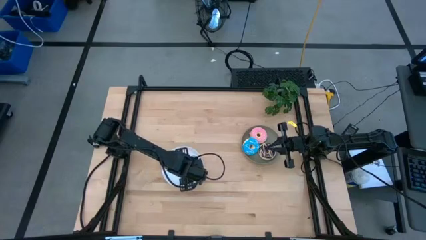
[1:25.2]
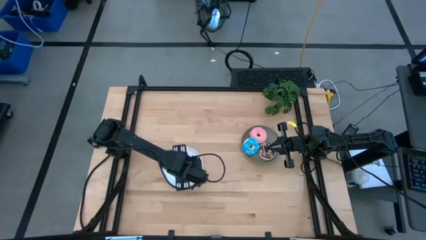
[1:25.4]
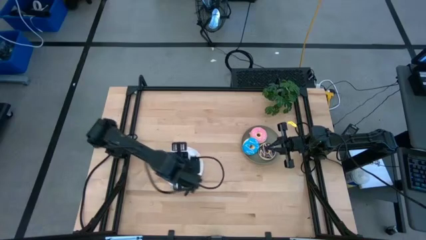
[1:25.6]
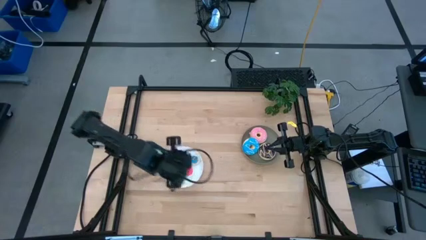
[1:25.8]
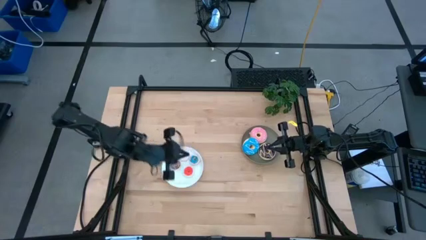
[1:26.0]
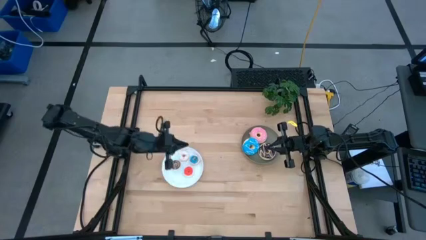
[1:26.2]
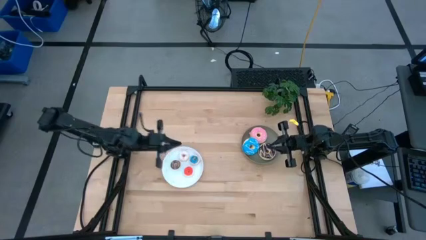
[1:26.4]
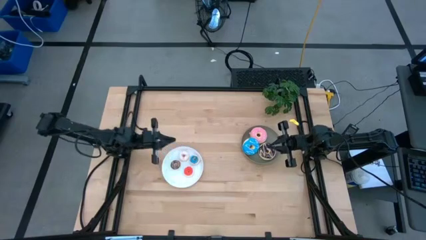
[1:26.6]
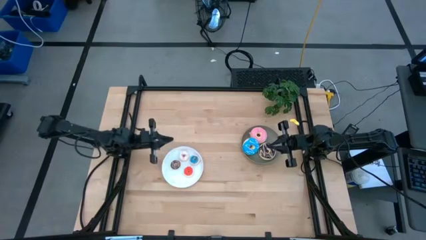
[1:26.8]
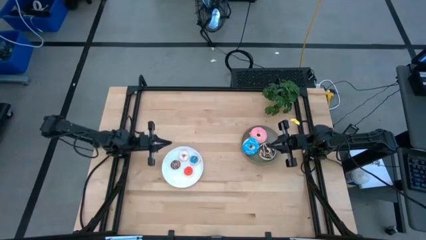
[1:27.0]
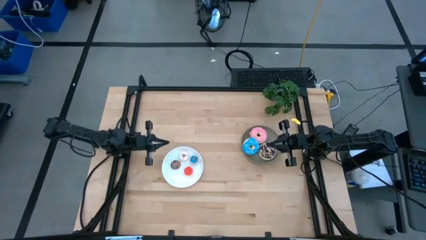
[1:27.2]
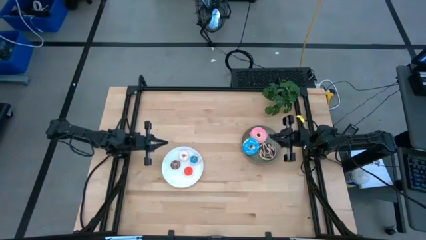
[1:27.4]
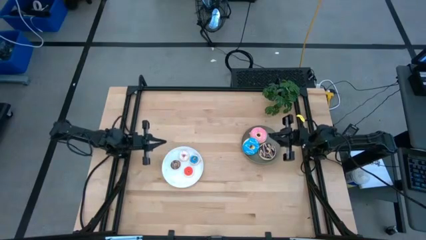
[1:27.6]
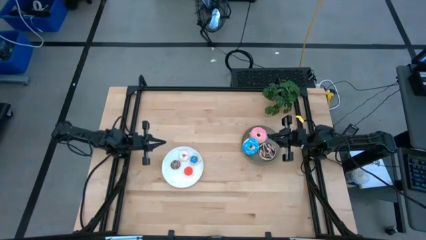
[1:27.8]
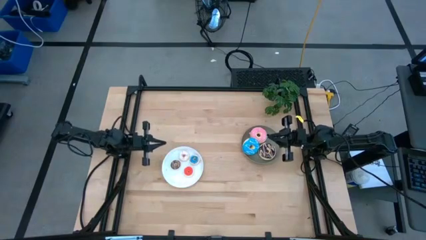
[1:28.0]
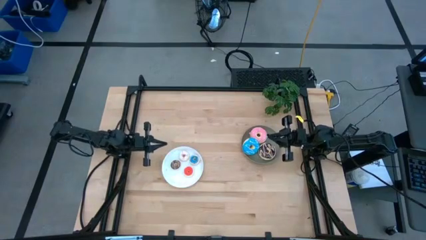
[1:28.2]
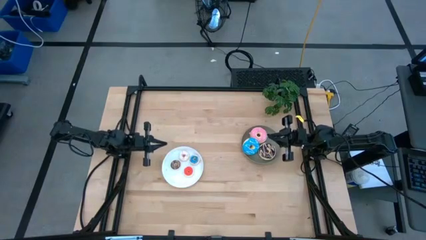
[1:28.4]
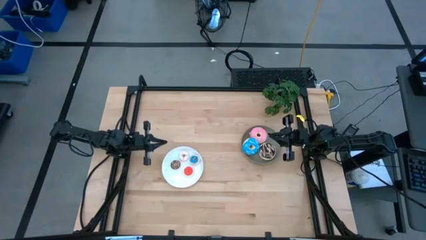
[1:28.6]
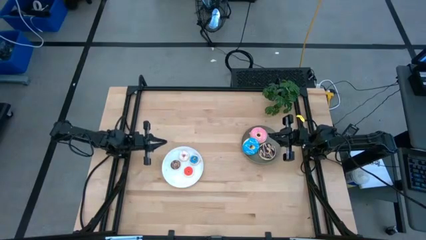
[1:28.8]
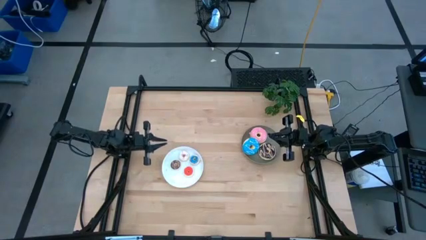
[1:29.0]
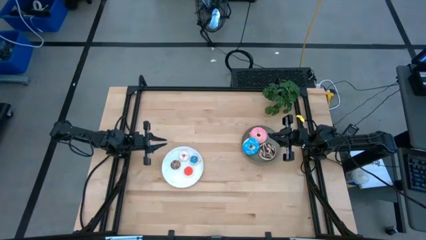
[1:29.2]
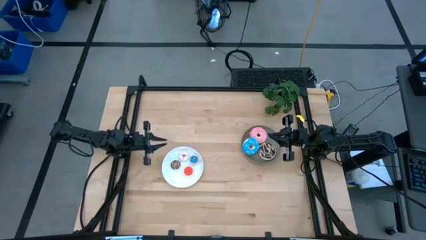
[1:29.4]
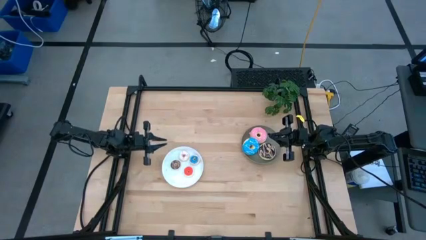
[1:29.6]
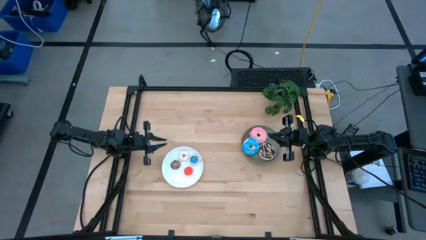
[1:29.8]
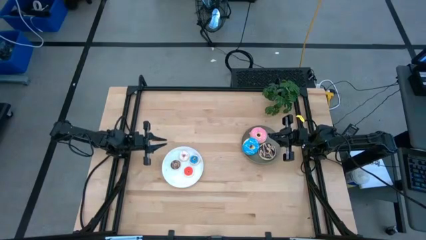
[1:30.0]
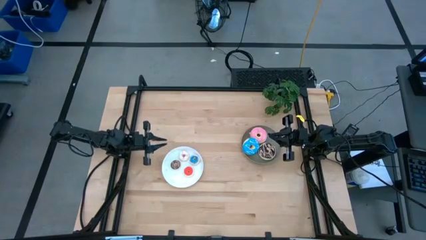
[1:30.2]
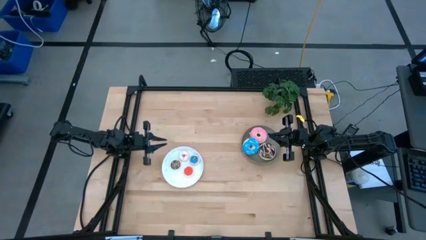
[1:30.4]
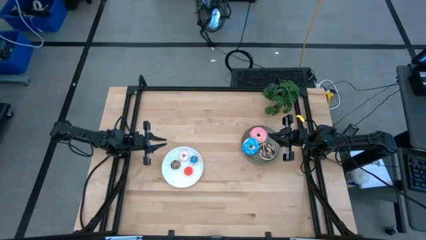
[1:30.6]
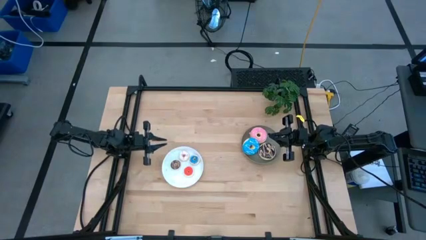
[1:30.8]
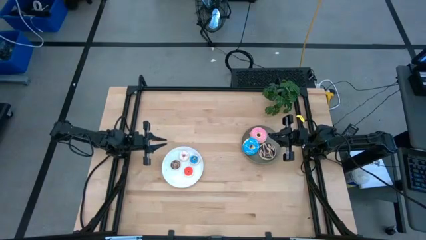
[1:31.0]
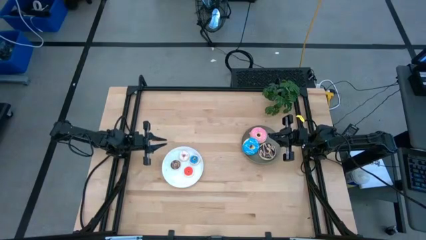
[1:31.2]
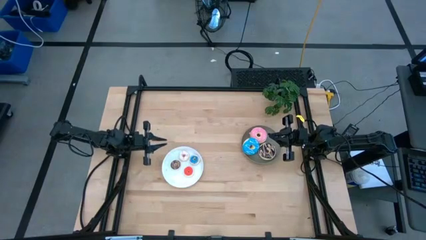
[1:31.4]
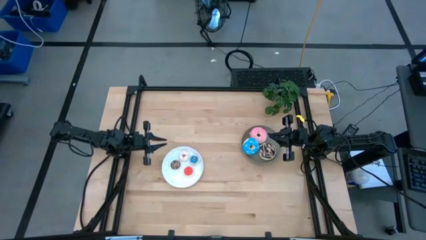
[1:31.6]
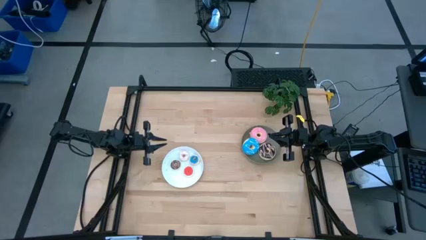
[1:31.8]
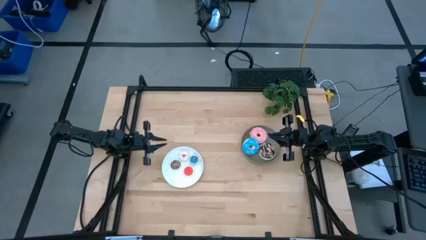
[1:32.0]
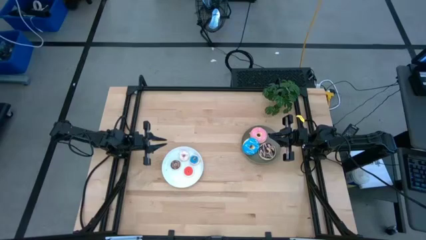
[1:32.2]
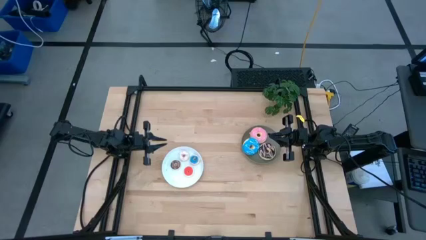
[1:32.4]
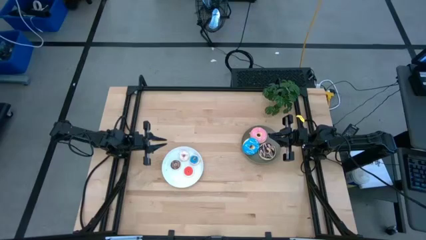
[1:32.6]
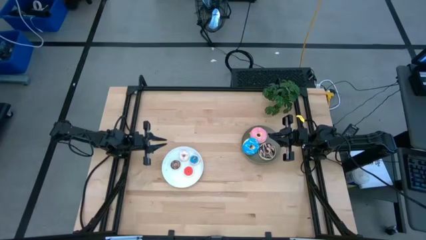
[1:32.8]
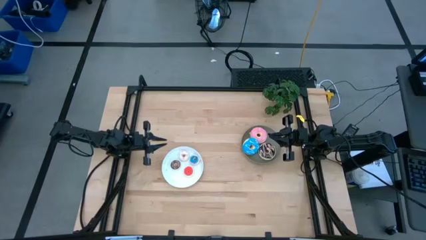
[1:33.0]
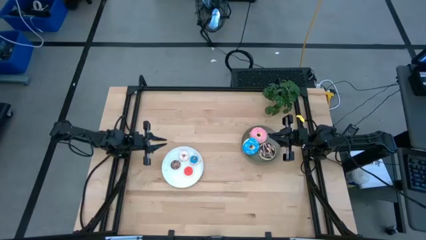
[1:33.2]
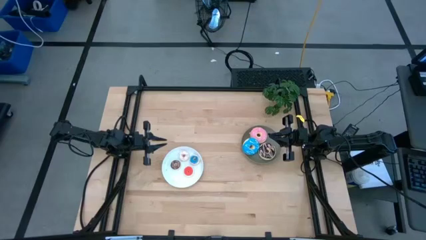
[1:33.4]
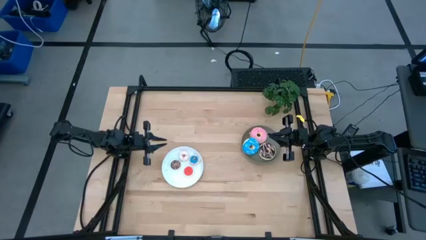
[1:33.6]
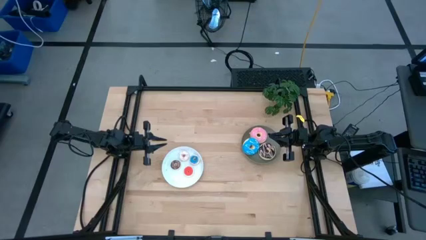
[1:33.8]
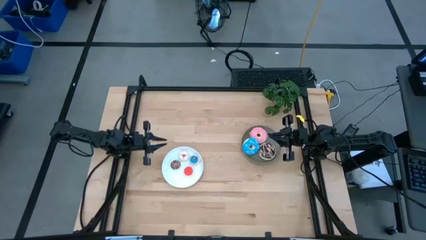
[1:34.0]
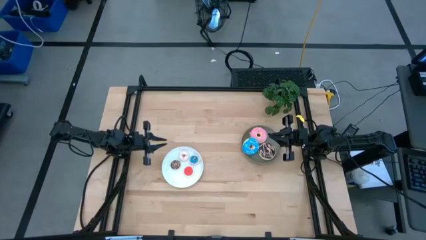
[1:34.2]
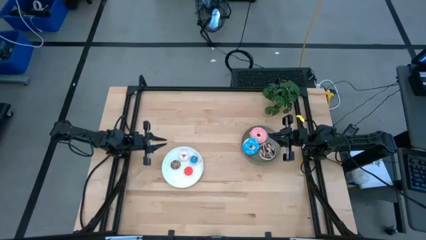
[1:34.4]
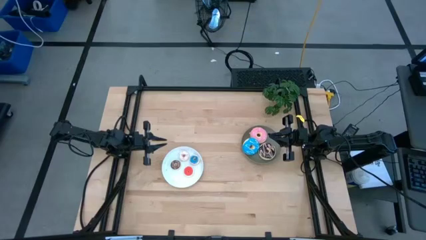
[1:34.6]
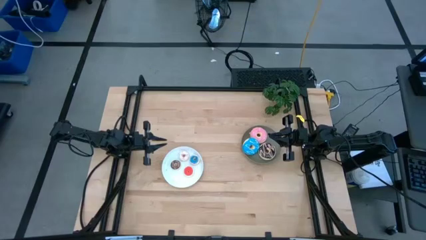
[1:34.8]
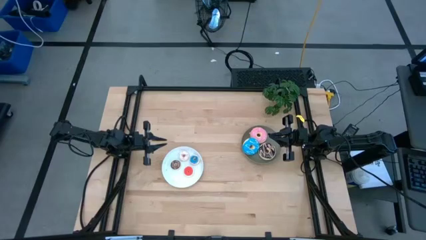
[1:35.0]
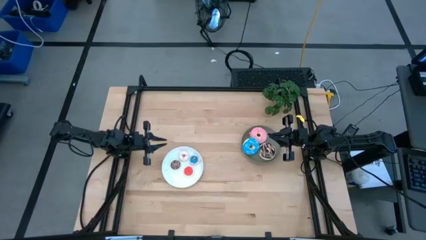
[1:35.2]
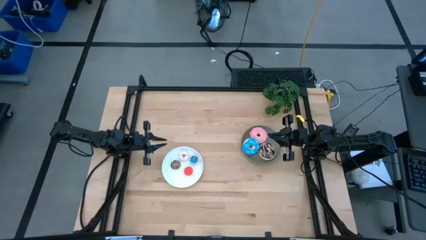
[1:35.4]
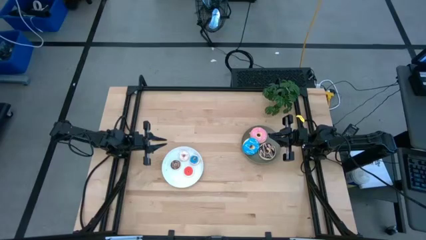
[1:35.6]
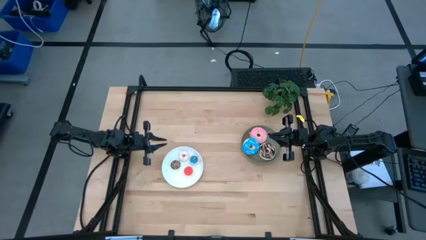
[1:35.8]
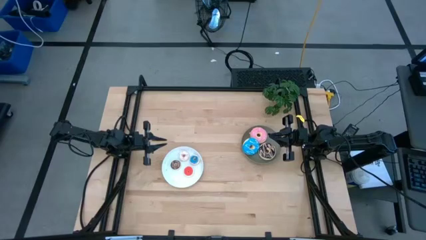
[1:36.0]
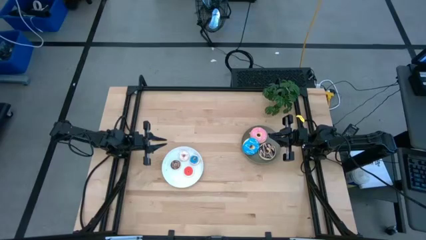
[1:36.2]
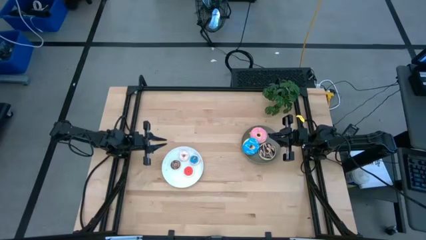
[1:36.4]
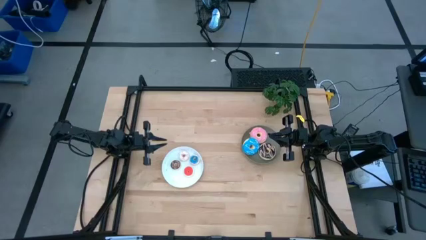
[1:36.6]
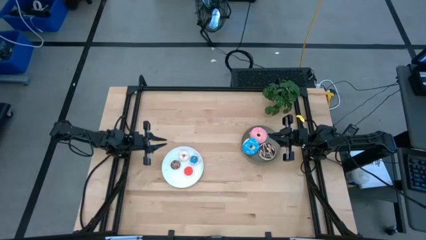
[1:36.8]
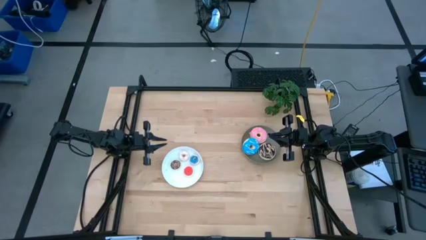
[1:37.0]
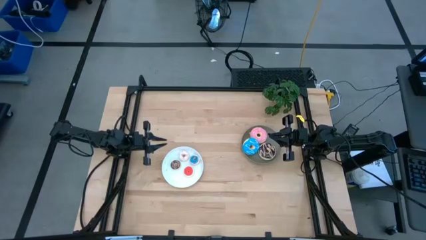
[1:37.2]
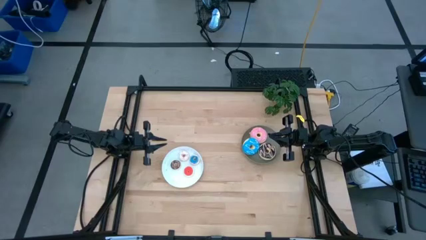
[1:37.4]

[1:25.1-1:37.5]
Task: Pick & Place donuts
Return to Home Position

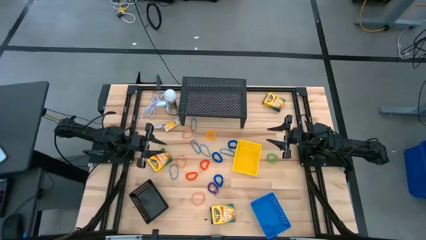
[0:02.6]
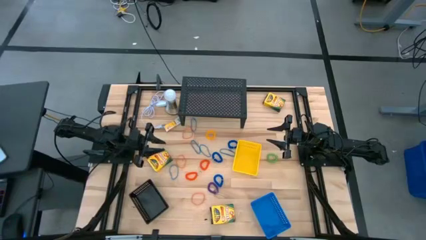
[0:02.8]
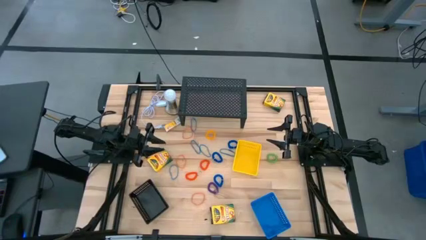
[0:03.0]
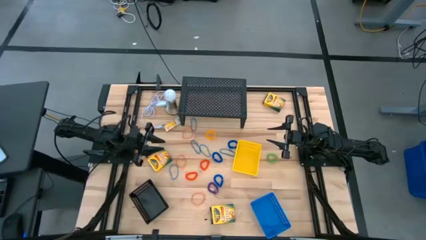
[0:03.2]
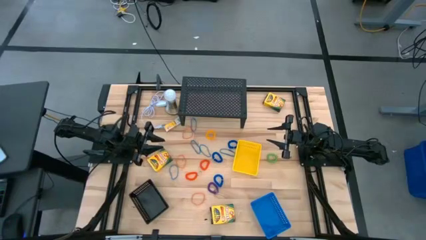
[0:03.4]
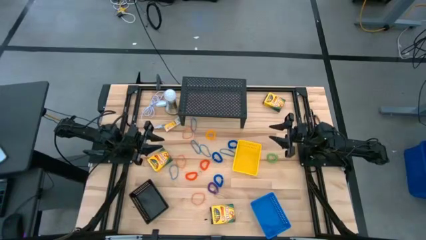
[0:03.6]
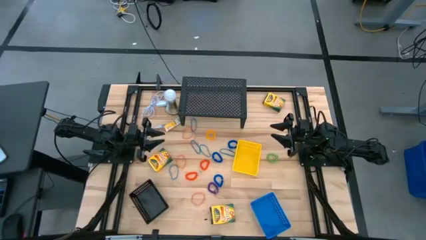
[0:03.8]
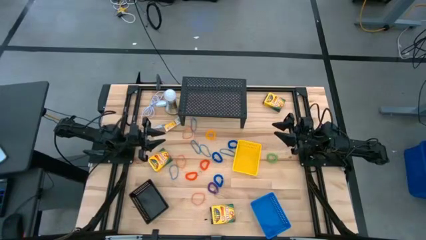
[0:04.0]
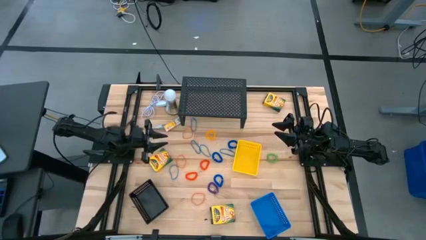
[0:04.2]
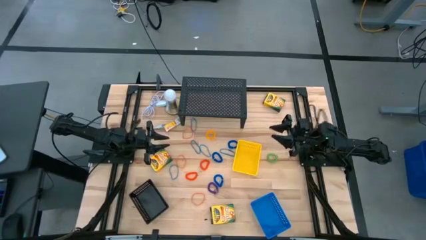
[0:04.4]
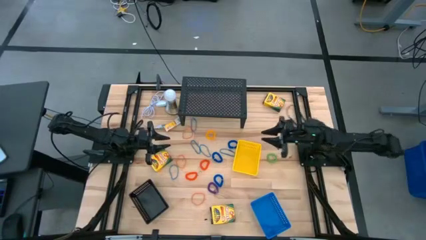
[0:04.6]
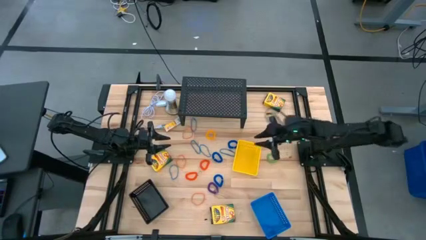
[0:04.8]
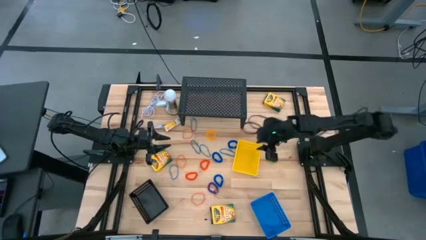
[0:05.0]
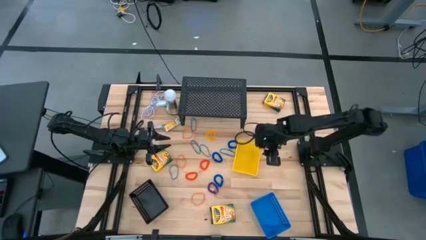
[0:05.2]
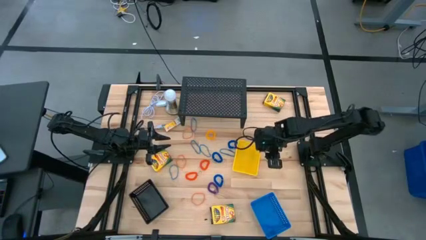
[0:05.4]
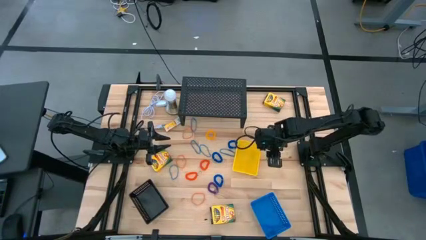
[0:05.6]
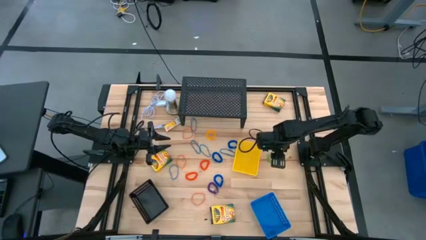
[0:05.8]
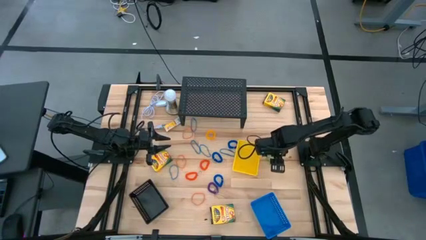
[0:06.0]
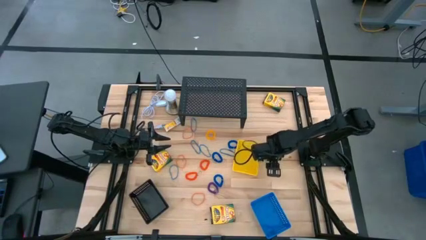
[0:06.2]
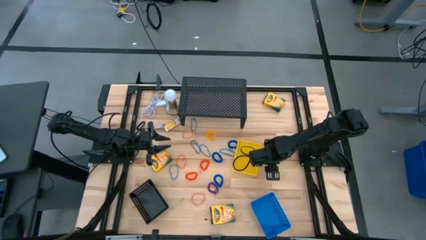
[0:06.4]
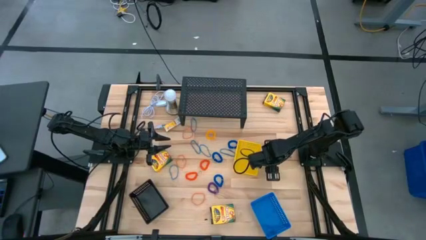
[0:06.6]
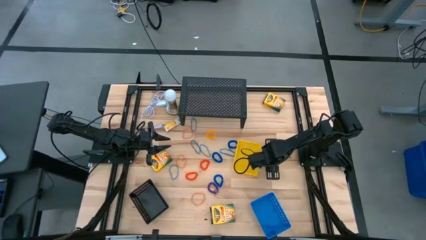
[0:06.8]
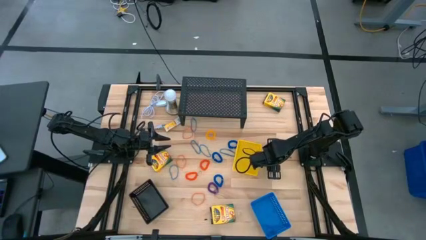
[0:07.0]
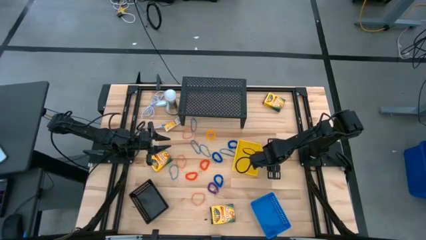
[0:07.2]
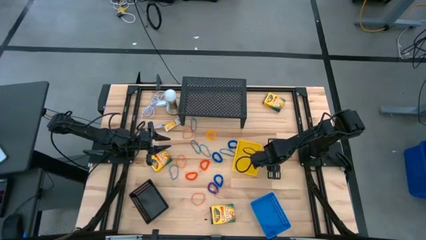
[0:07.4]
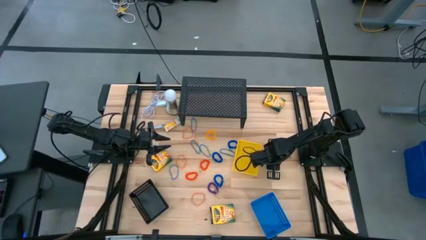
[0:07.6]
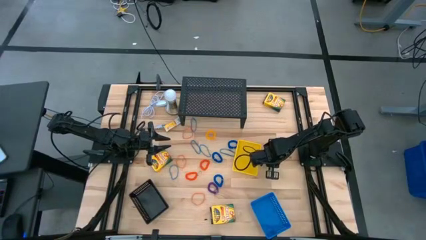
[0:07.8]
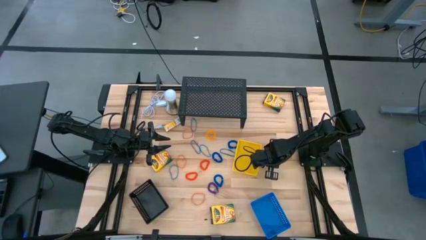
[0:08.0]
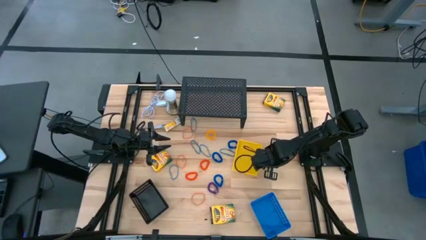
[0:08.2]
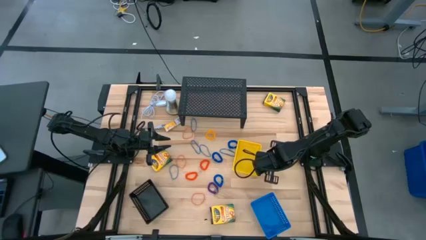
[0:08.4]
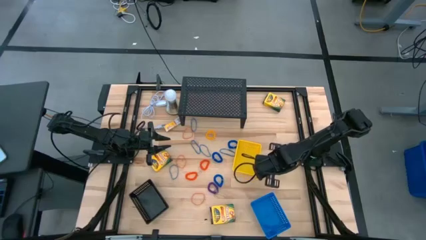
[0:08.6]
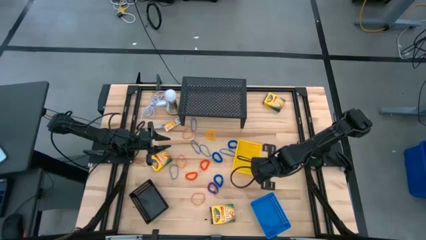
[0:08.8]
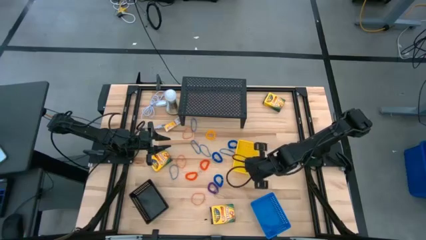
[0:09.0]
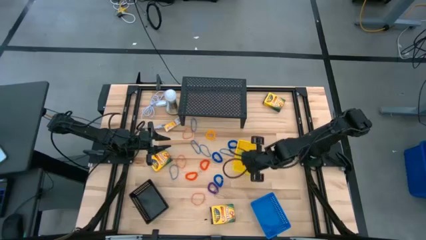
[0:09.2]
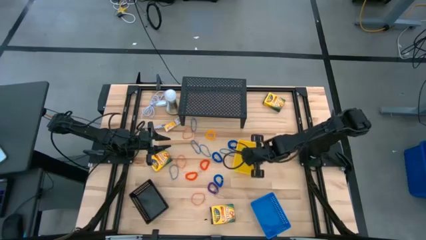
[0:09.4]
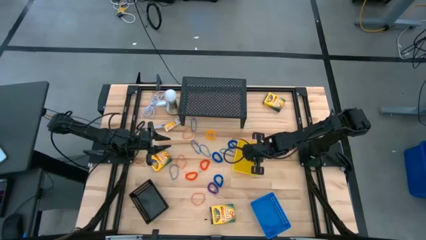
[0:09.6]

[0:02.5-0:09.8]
Task: Pick & Place Office Desk Supplies
Put the green spring keychain into the yellow basket
